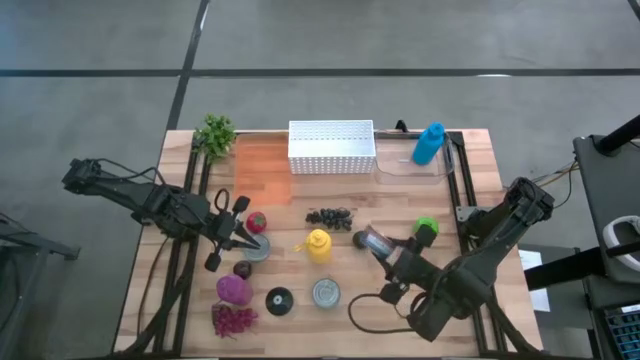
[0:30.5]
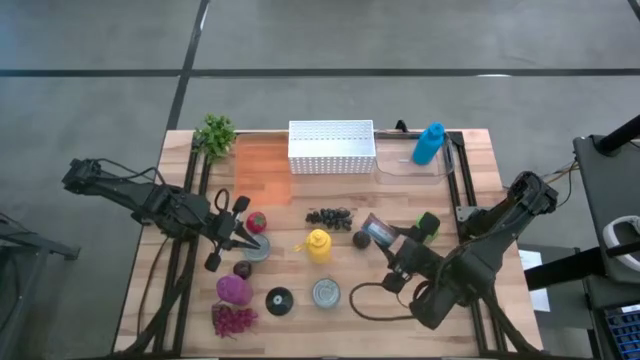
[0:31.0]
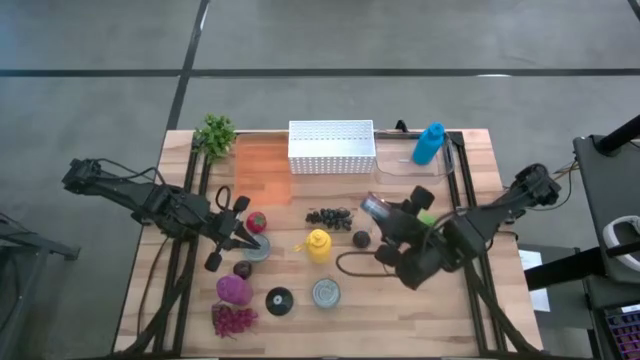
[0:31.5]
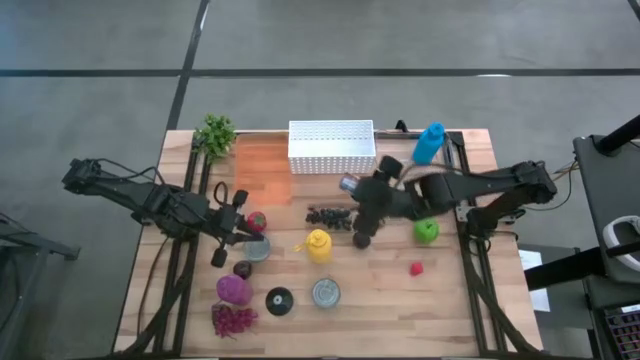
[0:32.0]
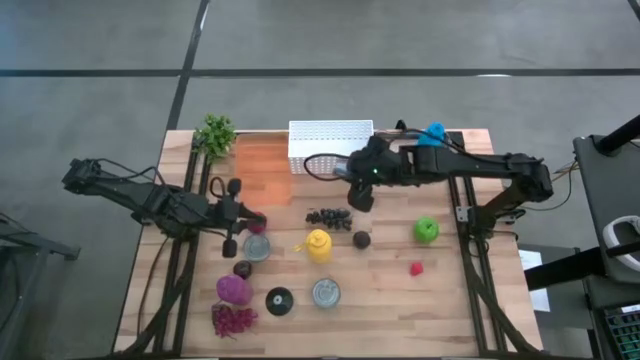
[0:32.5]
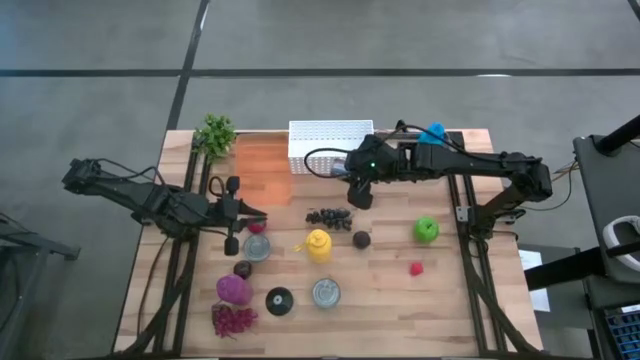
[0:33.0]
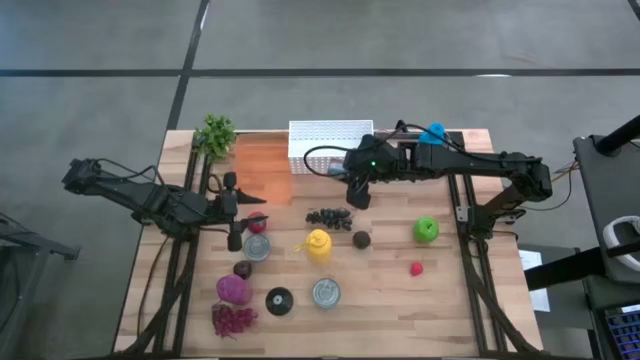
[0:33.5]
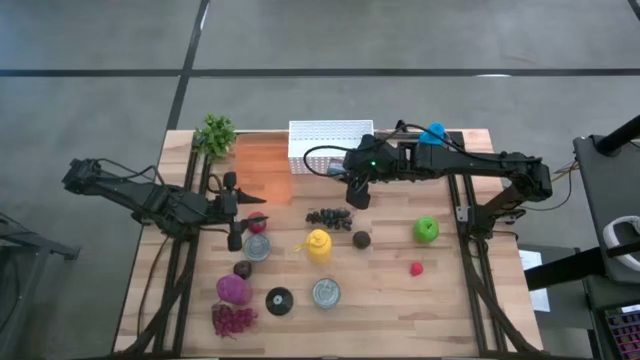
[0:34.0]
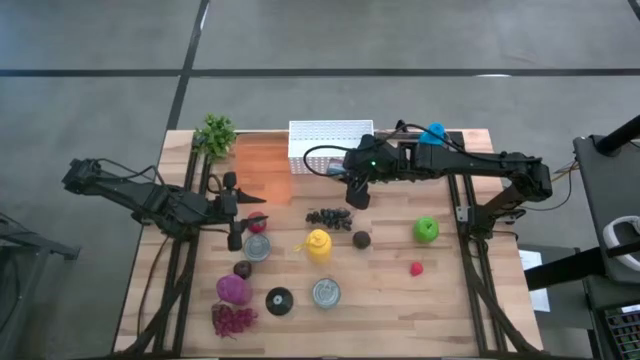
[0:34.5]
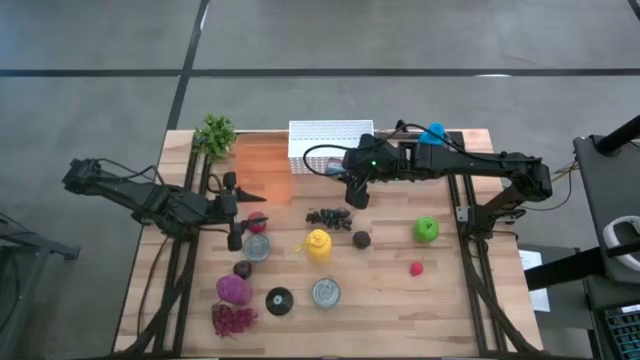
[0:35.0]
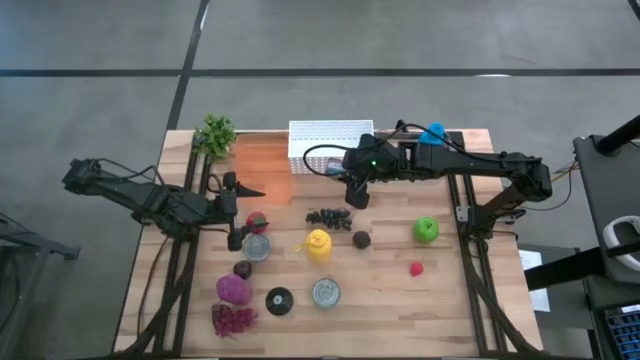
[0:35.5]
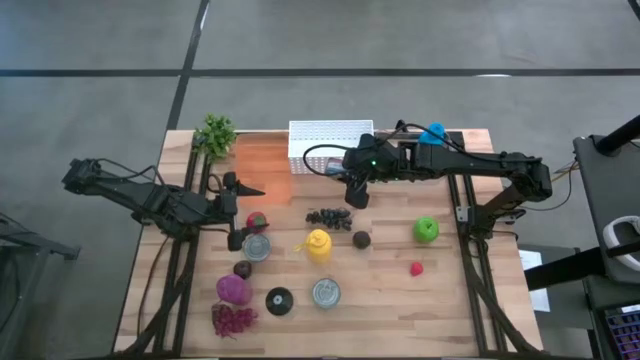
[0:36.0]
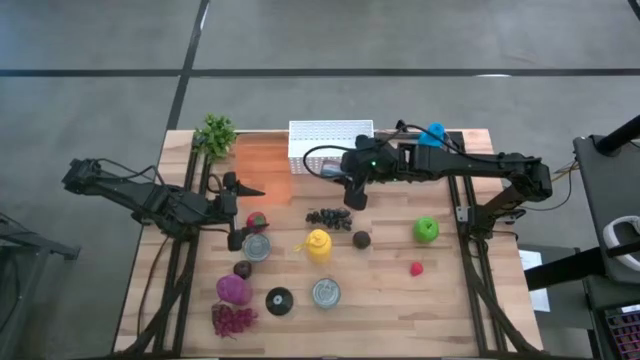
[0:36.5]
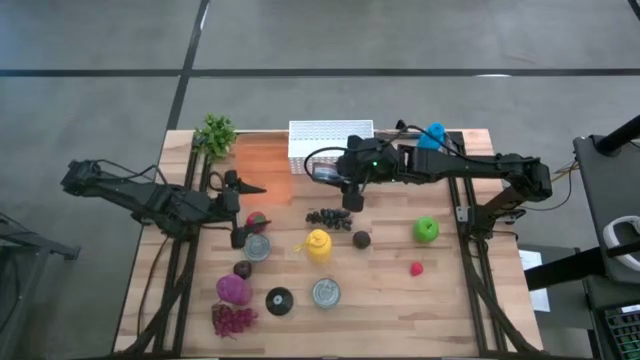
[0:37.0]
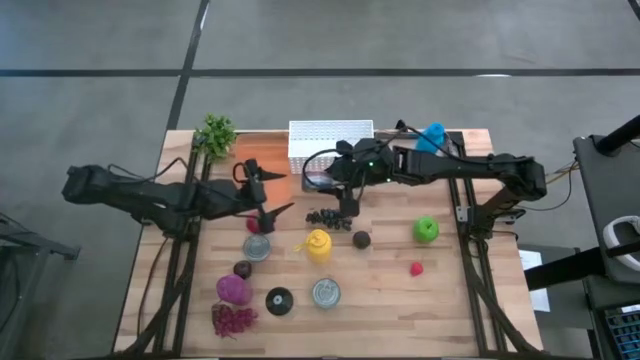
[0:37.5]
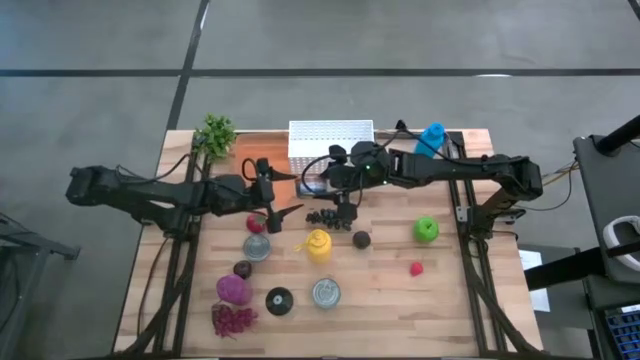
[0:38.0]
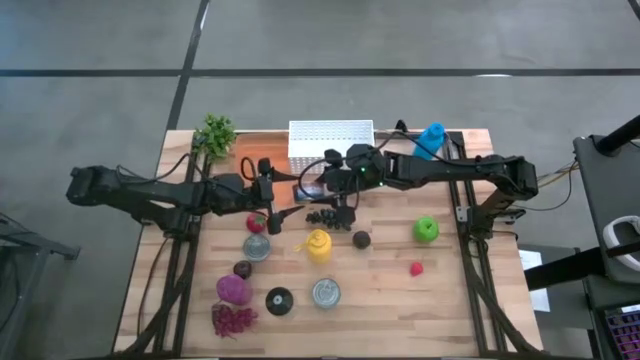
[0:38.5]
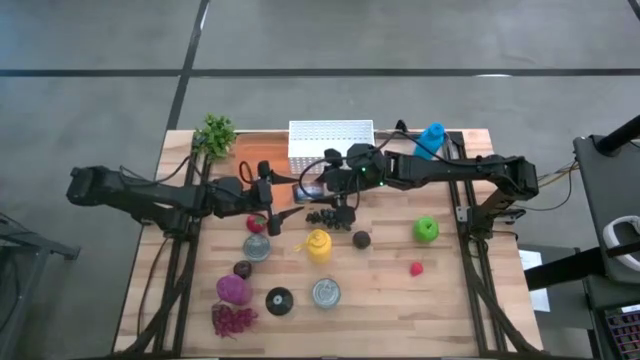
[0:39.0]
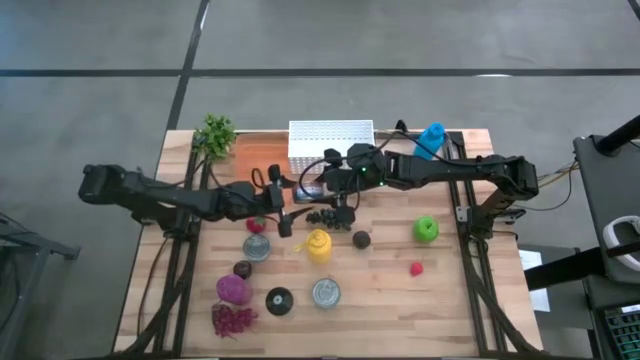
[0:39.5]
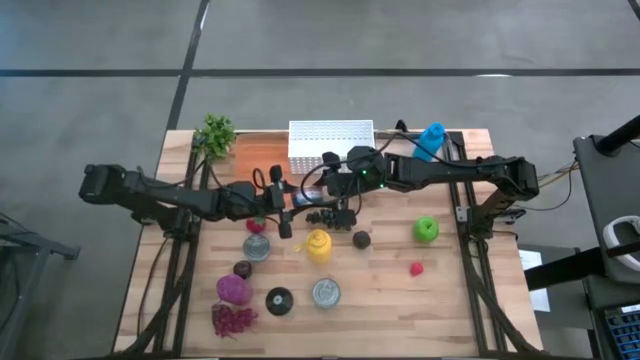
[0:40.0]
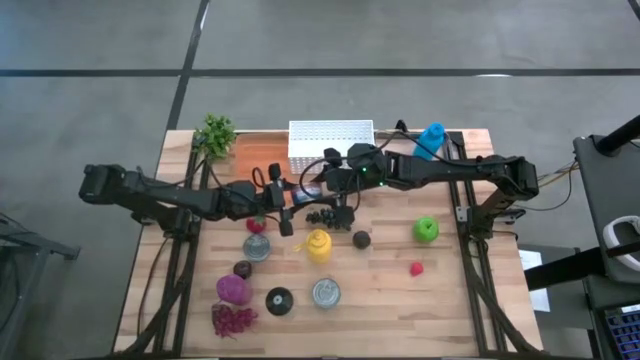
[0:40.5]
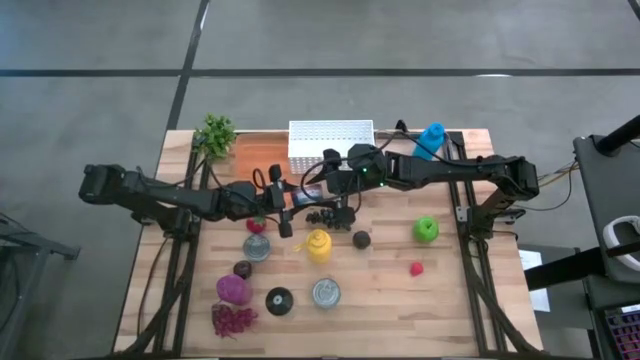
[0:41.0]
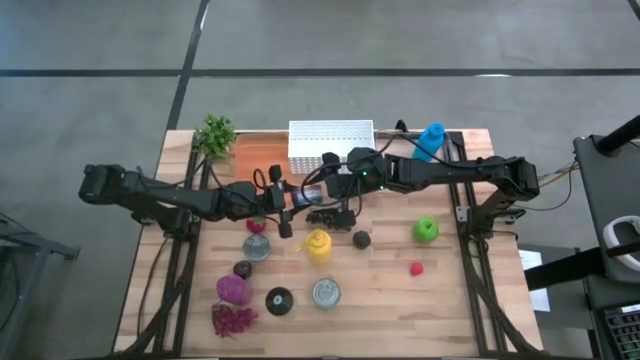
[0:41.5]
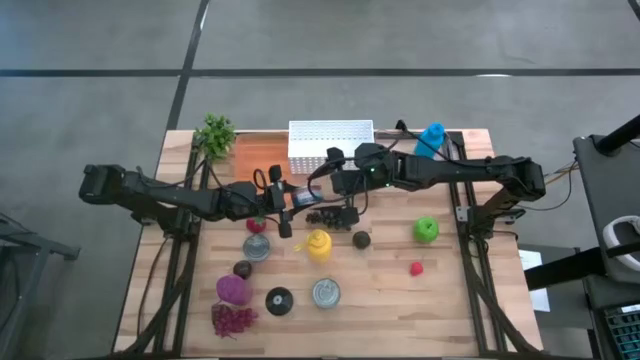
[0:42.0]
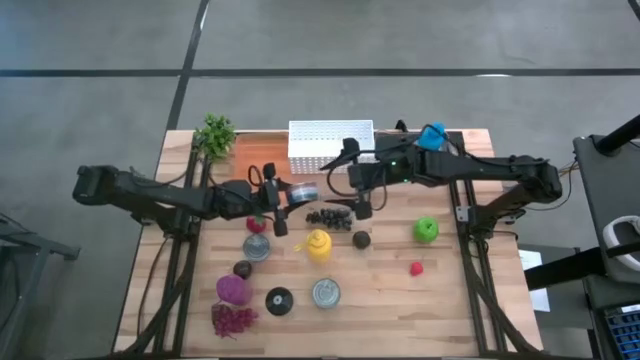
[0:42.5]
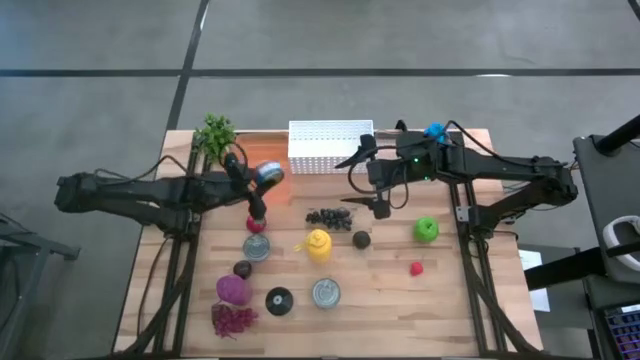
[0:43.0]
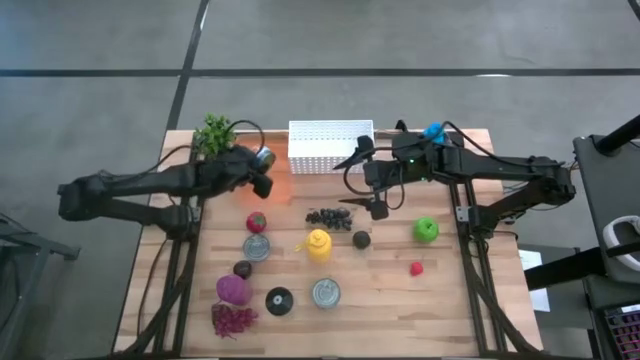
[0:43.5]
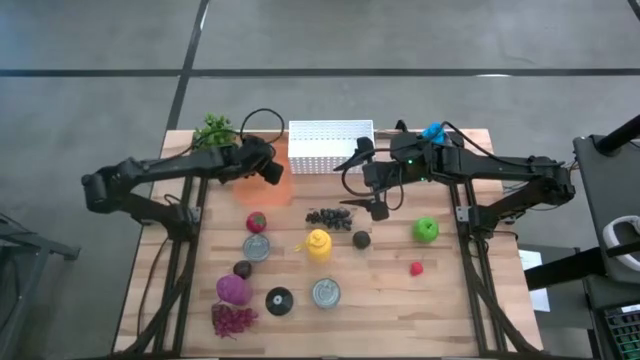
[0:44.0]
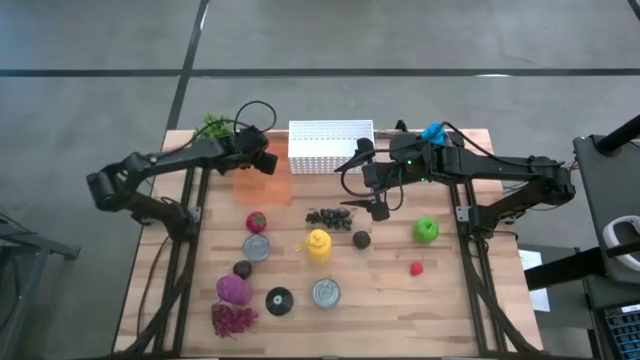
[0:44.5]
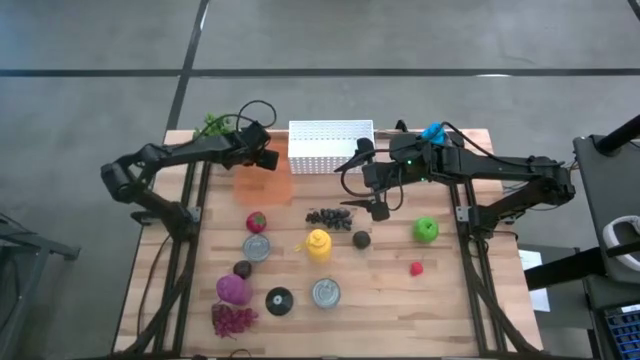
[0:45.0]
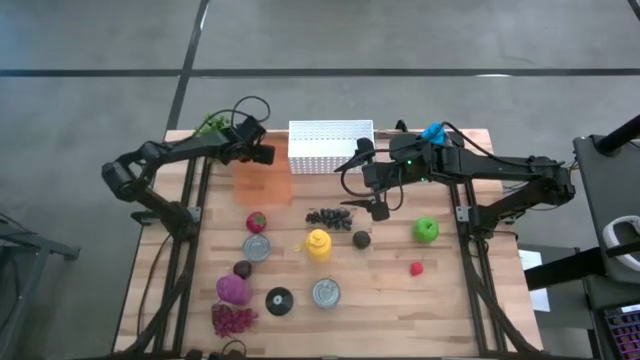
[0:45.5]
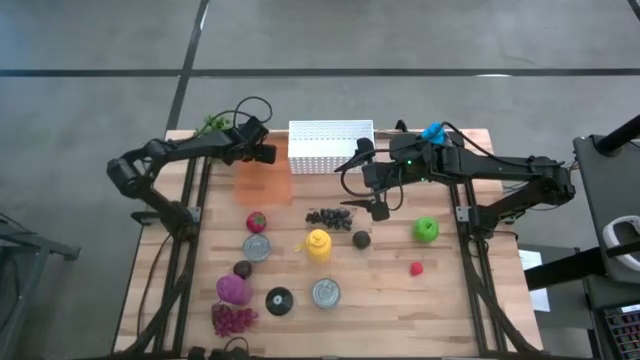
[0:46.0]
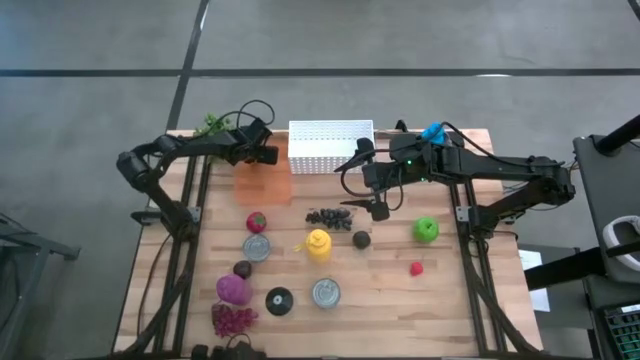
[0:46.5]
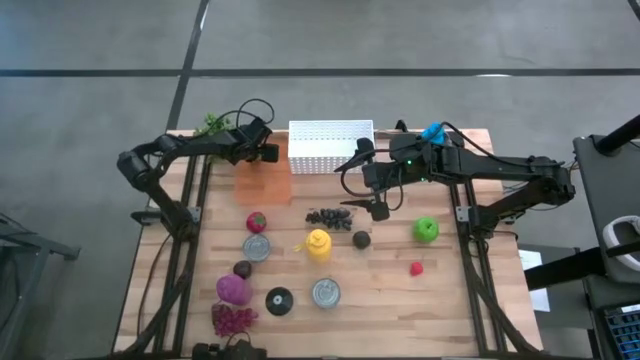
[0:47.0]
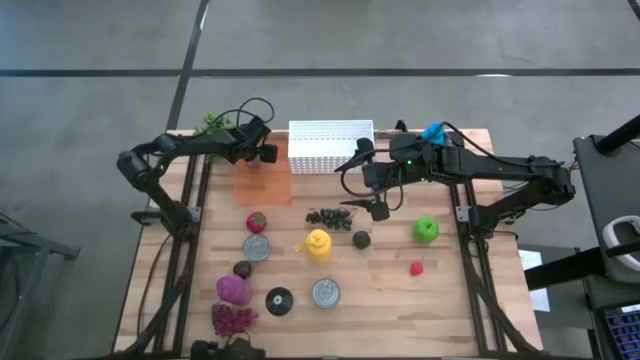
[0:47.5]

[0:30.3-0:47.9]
Task: Pick & Place Food Item
Put the blue-pink tuna can into the orange bin

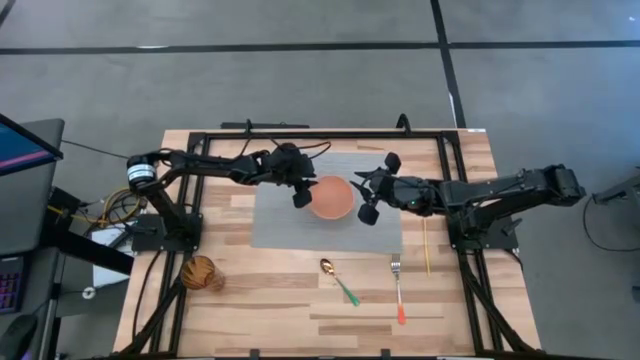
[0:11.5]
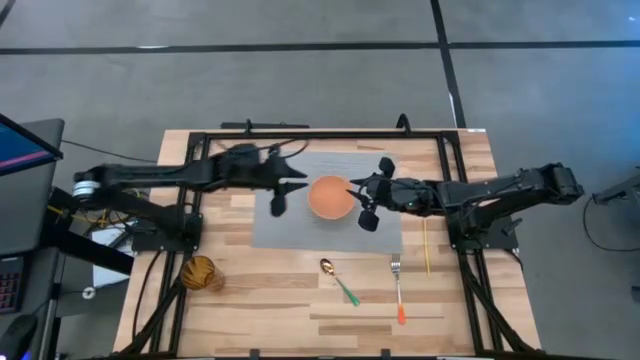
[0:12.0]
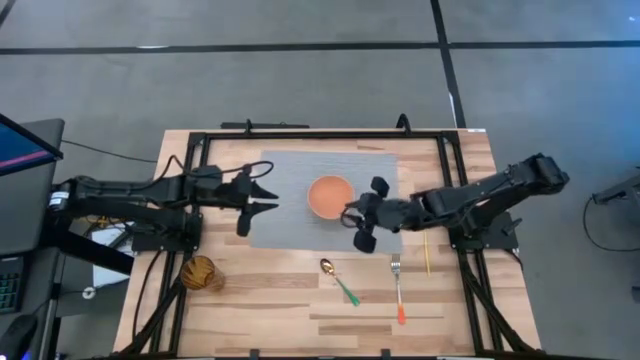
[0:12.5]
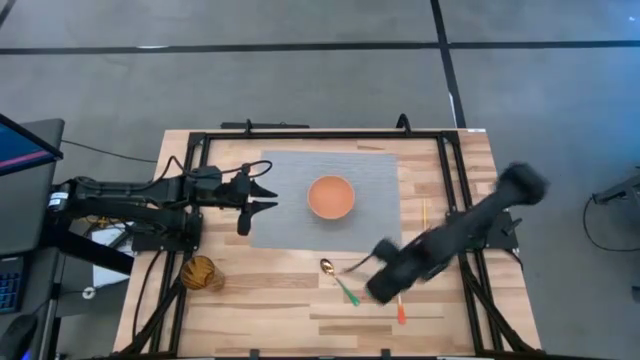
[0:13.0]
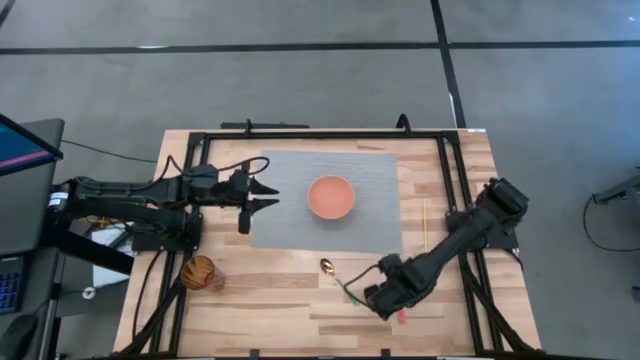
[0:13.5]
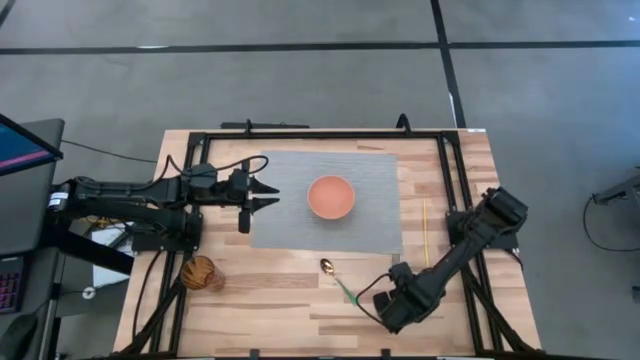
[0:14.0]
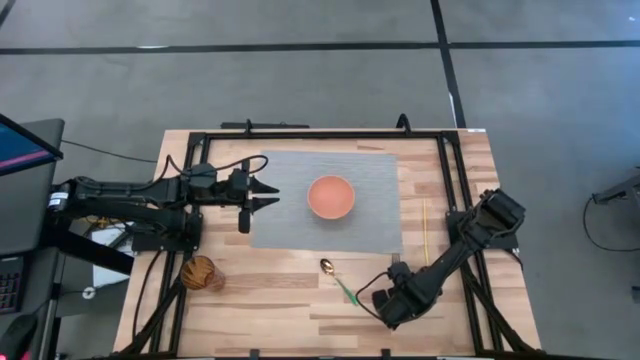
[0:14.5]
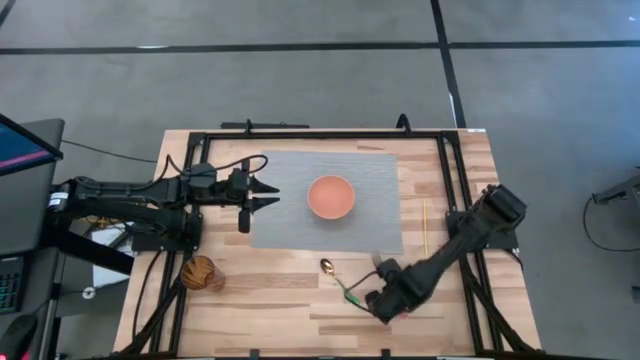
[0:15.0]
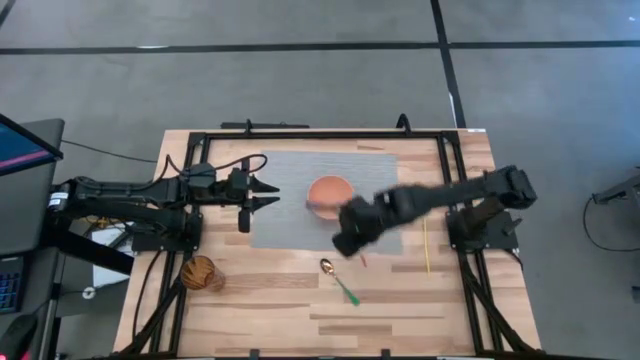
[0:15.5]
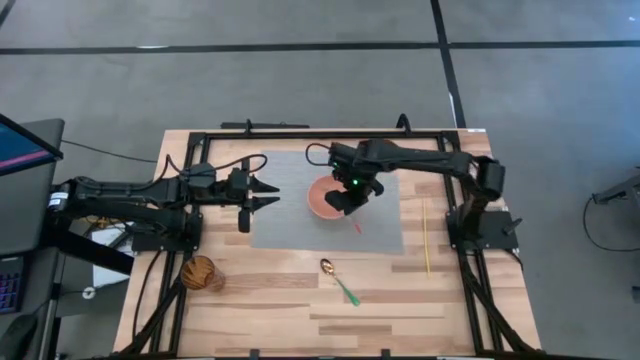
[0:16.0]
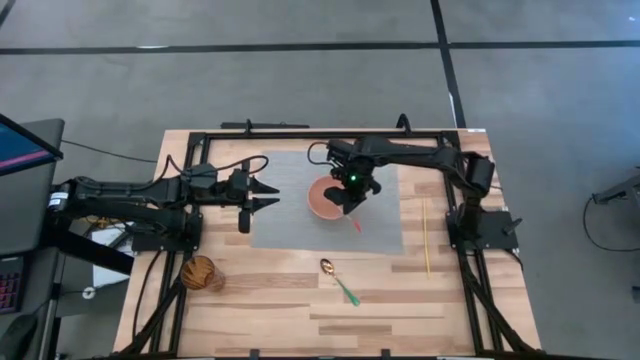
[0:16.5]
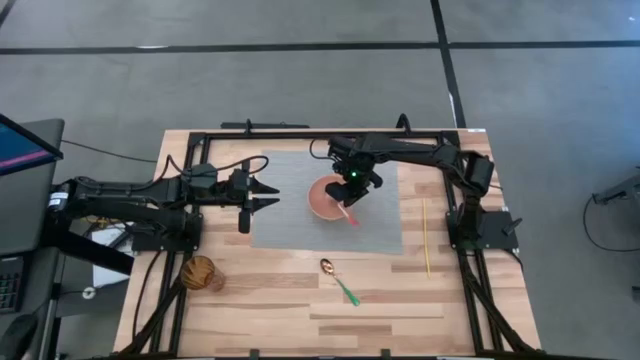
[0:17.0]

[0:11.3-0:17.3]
Task: Pick & Place Utensil
Put the orange spoon into the orange bowl on the gray mat
